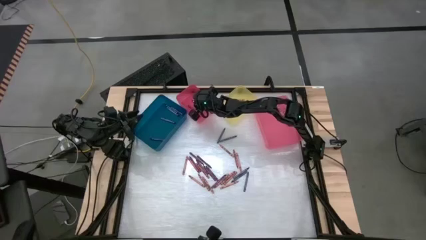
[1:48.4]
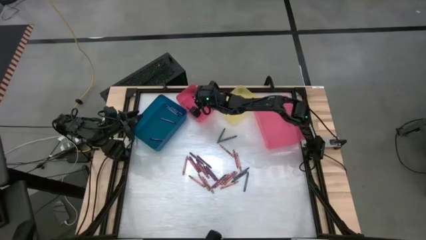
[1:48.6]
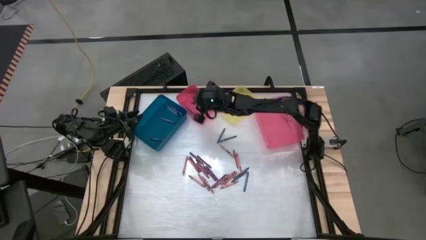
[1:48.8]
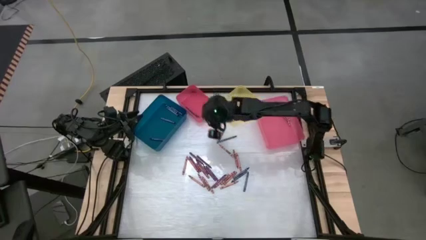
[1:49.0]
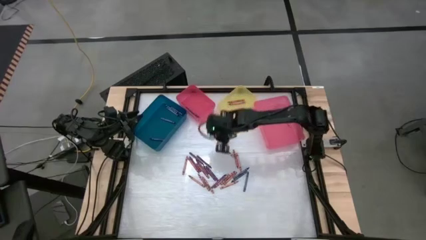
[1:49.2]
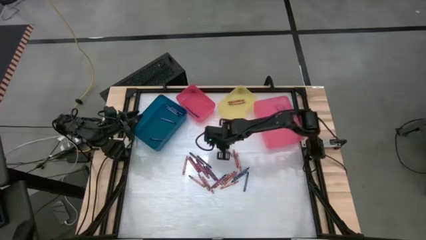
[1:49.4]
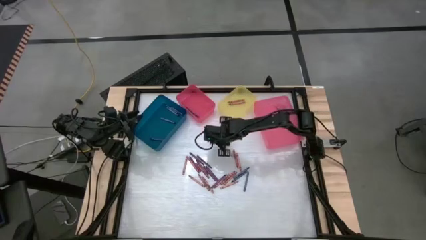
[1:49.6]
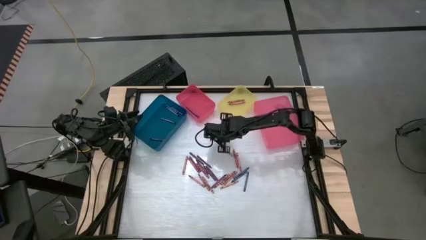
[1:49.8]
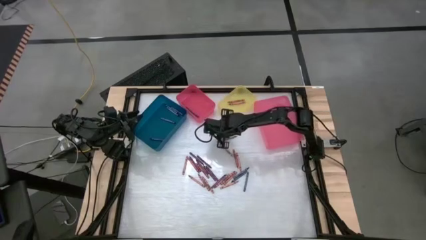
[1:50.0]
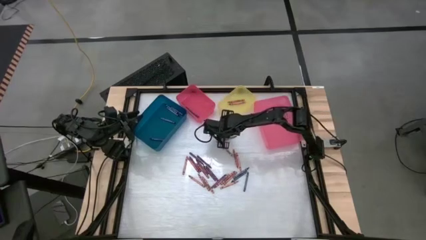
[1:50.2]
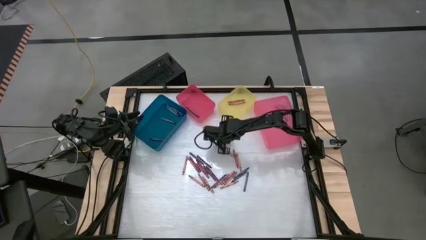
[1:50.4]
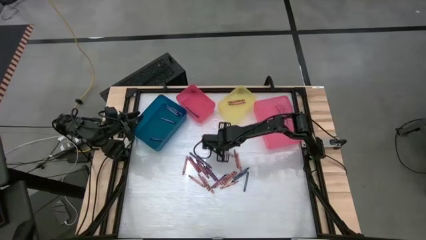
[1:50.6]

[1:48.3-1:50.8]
Task: Sort crayons
Adjust the blue crayons on the table

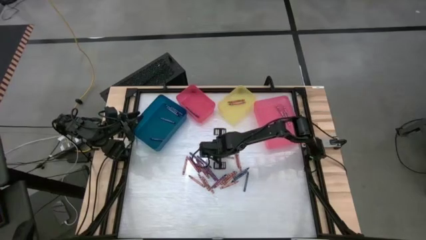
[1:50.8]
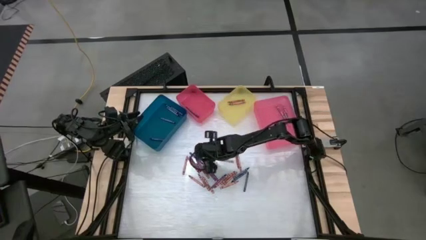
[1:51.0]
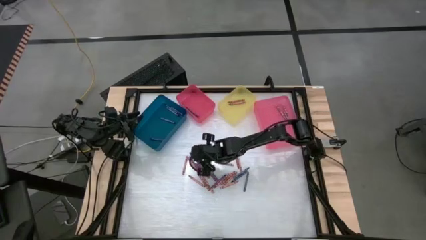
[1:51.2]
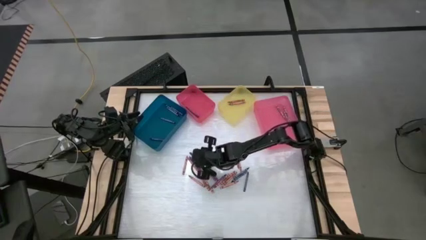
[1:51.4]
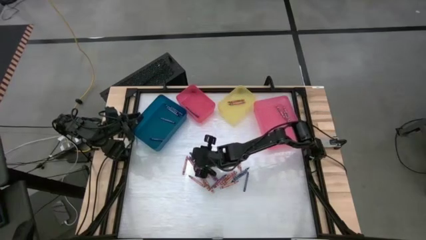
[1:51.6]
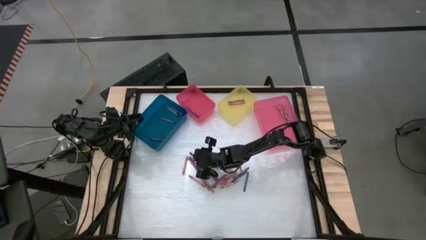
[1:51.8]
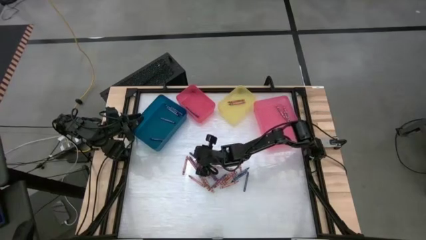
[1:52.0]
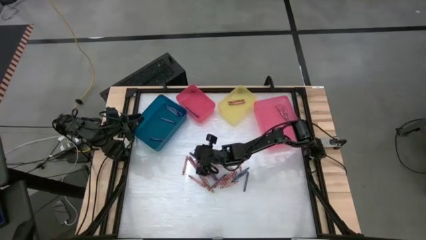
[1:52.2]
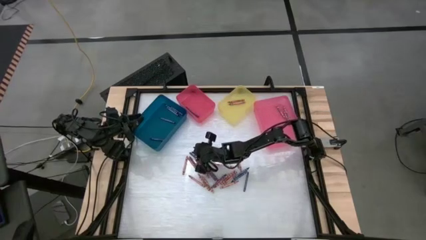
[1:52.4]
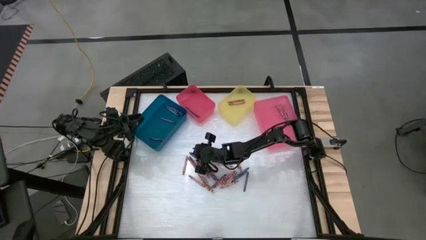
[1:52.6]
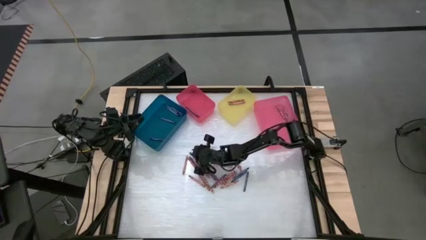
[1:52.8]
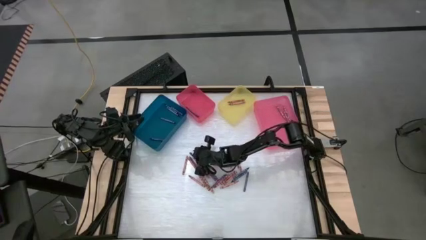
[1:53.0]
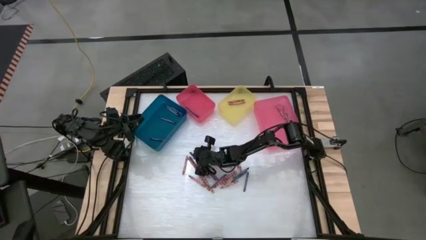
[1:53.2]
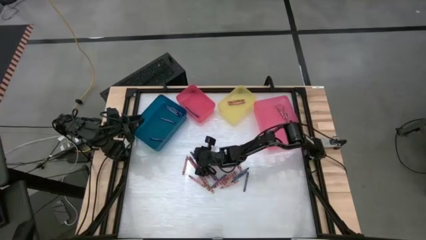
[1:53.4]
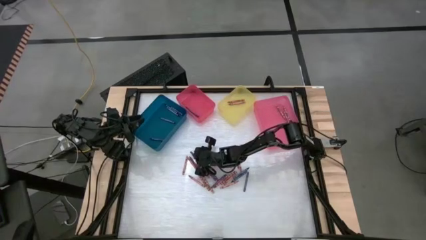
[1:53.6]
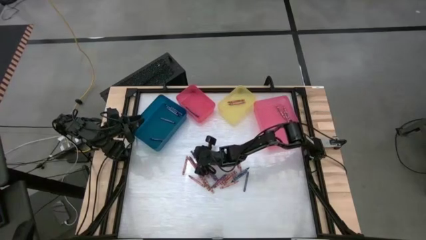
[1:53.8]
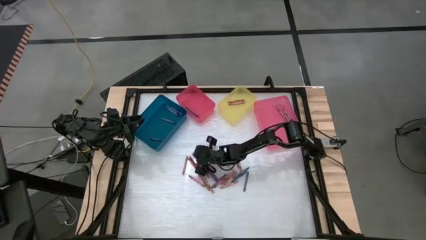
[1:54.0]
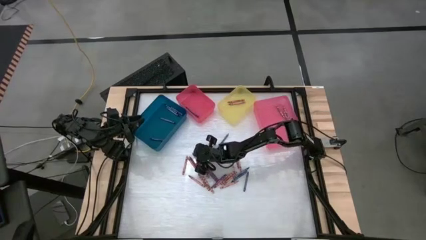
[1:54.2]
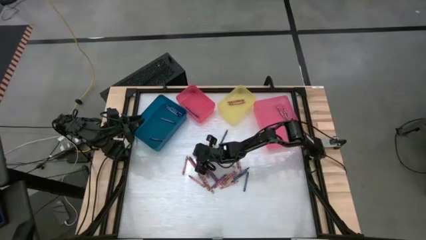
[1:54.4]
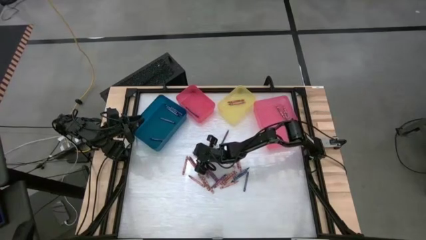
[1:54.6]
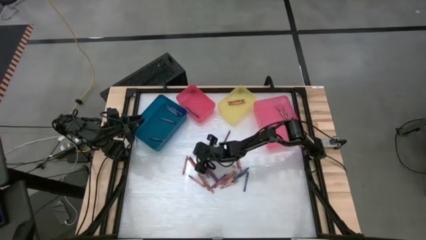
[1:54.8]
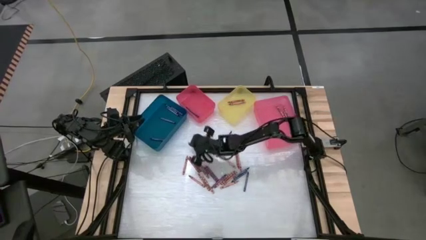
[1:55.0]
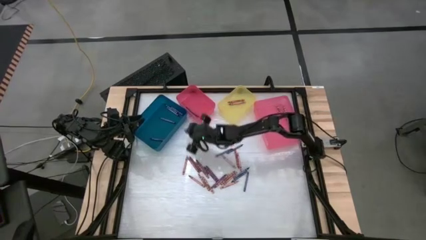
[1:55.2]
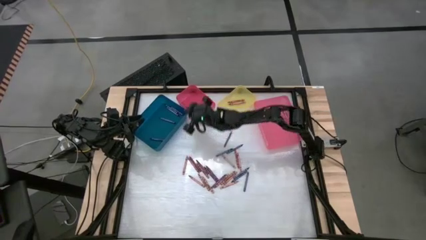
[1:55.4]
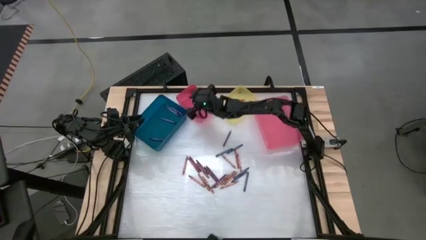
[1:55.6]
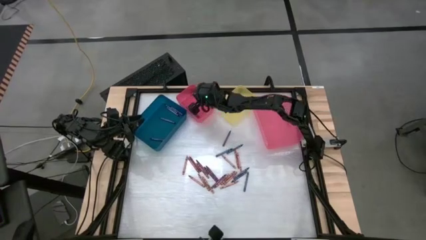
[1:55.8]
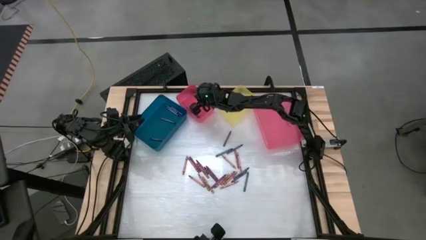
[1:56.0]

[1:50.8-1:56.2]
Put the violet crayon into the left pink bin

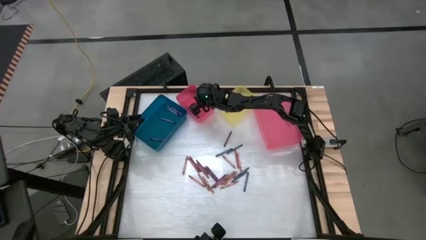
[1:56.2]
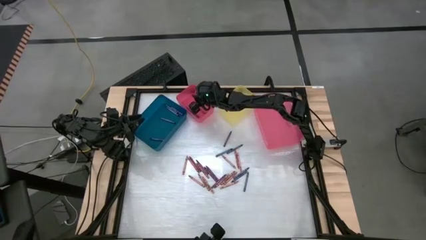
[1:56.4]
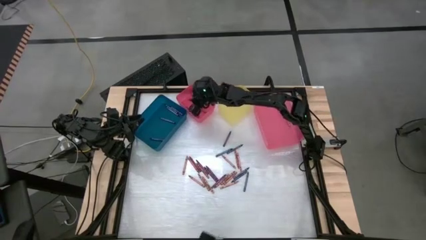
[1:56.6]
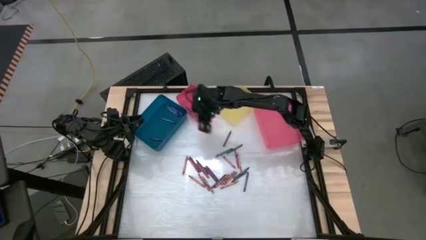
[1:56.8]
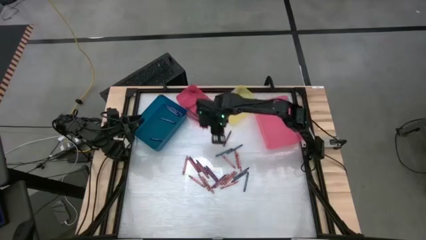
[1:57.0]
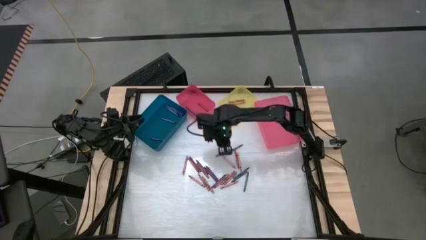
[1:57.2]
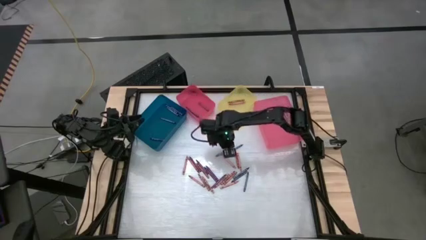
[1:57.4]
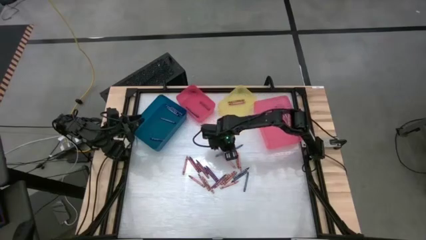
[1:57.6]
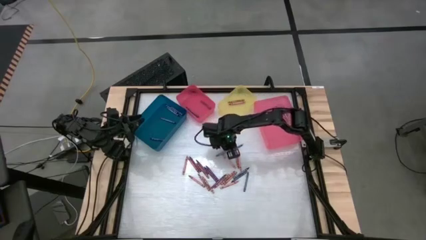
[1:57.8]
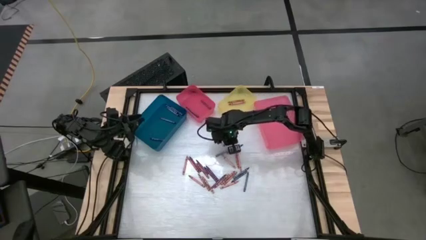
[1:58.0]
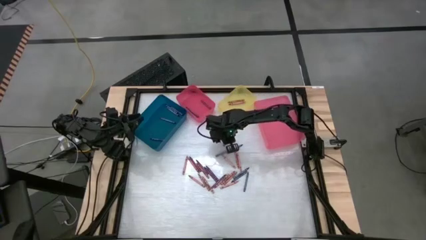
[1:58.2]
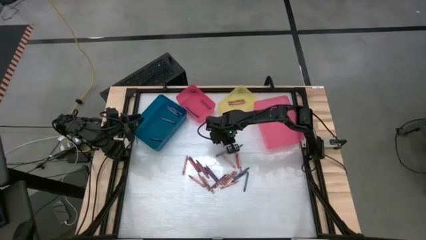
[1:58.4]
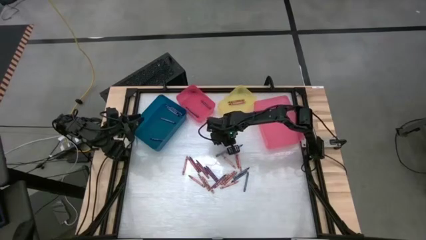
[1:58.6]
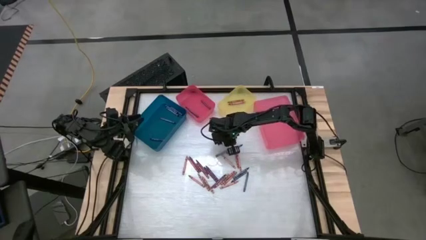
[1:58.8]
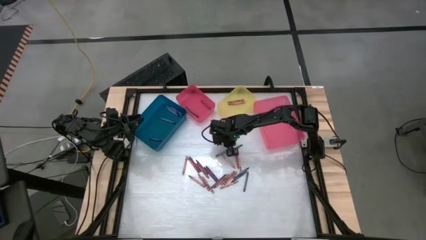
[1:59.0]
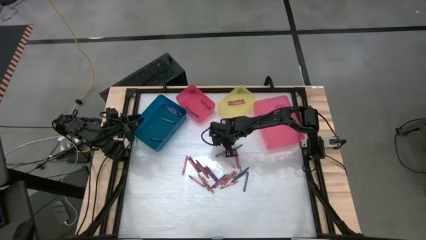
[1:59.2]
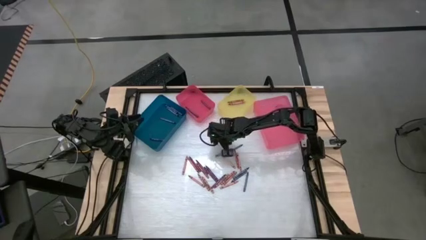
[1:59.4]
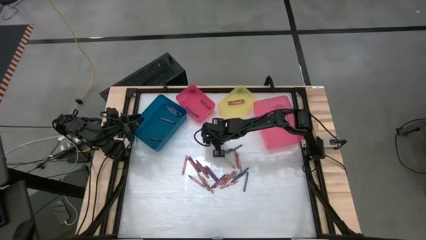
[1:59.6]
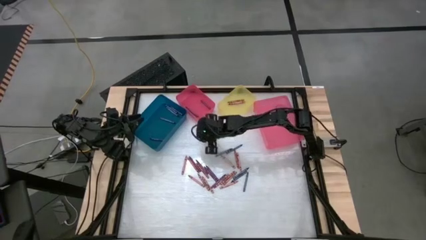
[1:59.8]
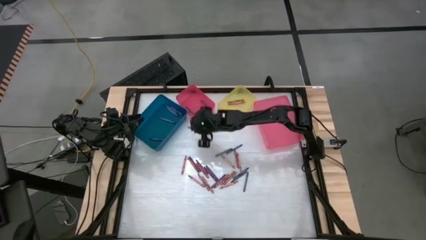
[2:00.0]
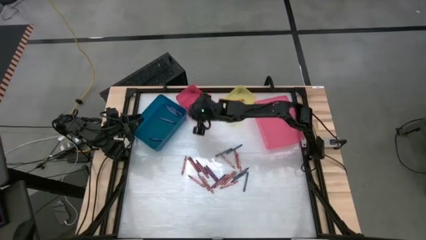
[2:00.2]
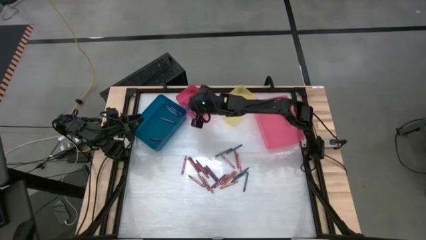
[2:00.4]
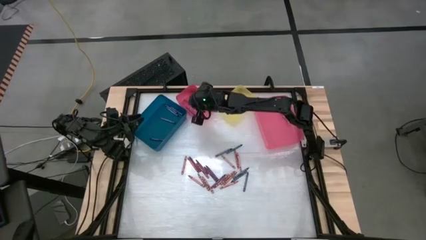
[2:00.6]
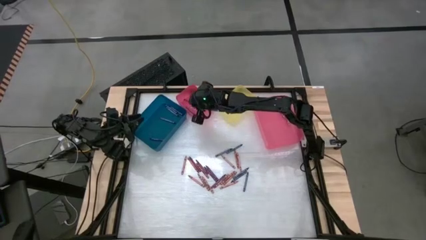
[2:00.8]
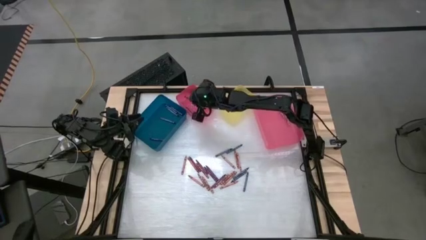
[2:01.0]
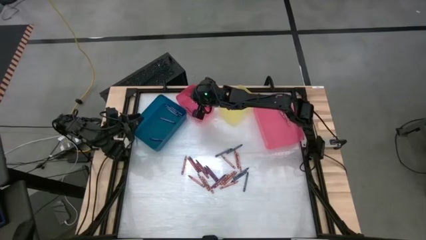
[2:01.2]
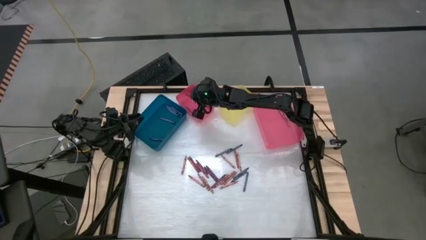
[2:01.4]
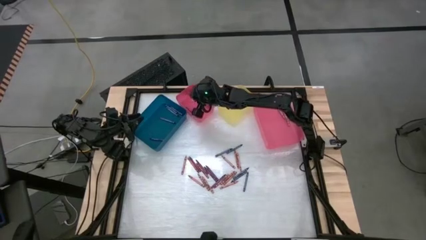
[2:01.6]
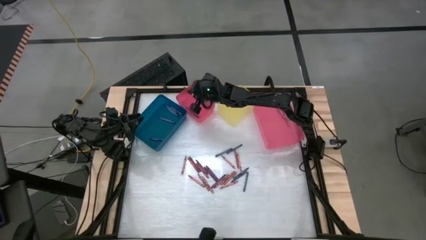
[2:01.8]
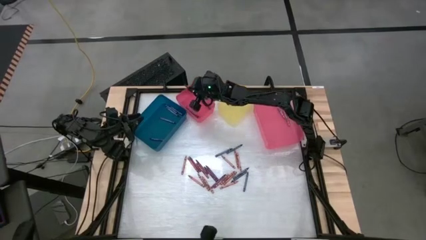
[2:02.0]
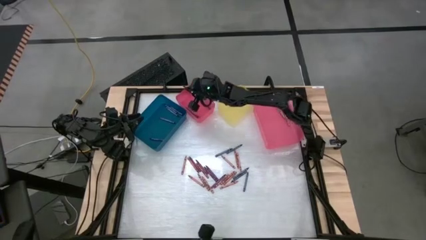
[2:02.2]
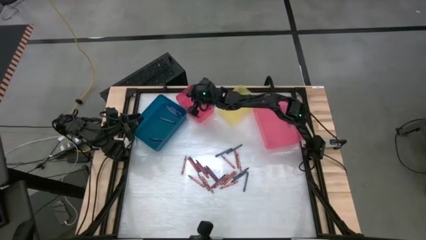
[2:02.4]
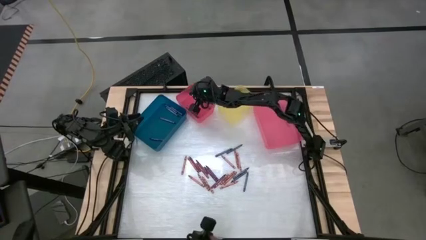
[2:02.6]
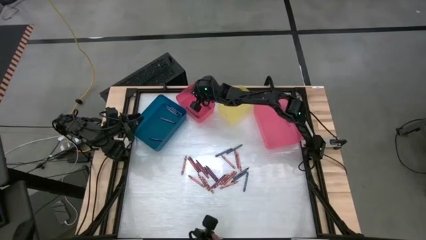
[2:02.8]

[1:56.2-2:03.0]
Put the violet crayon into the left pink bin
